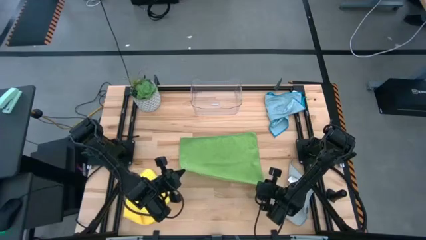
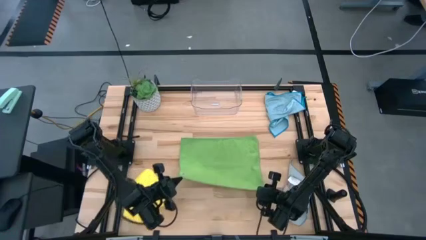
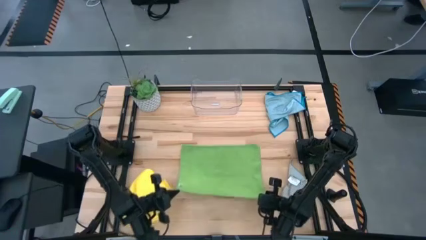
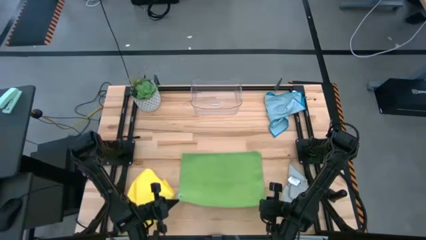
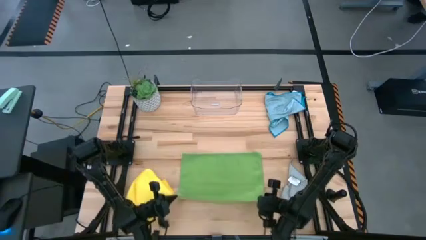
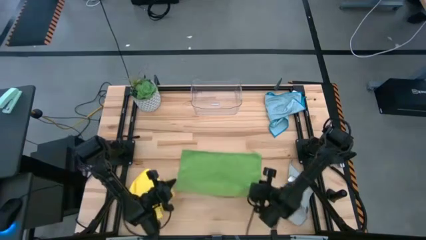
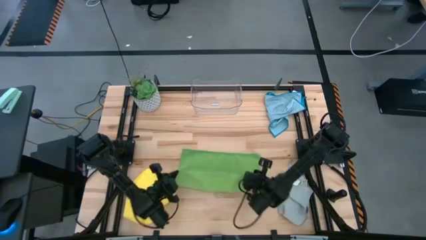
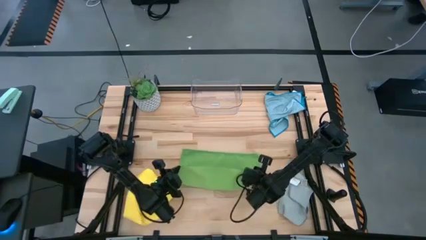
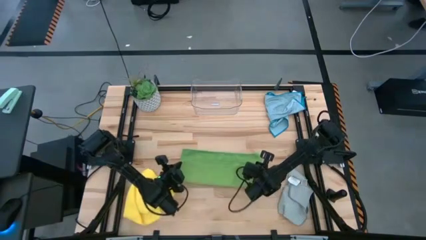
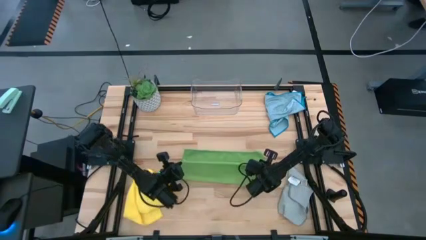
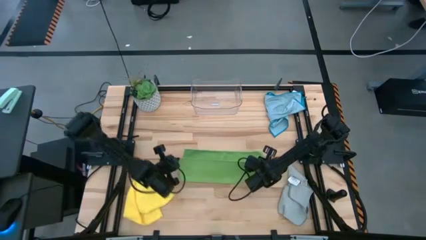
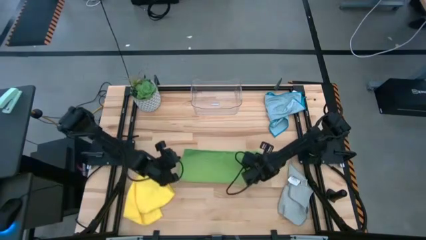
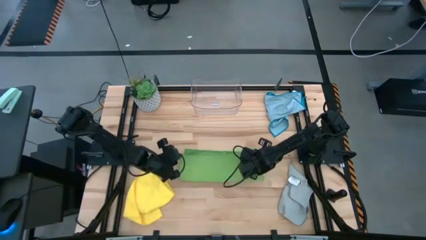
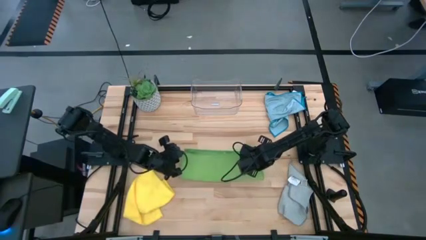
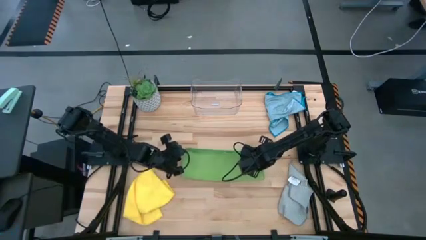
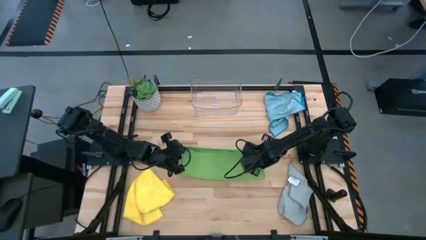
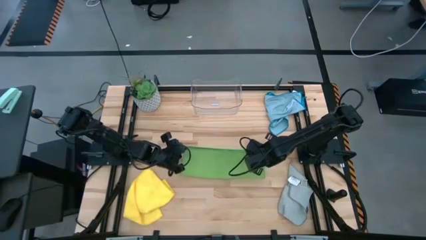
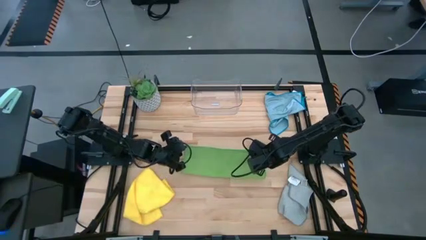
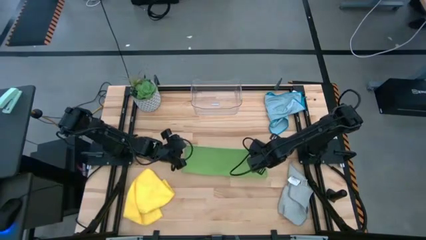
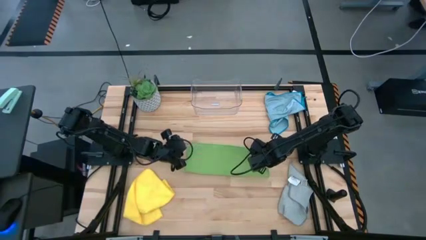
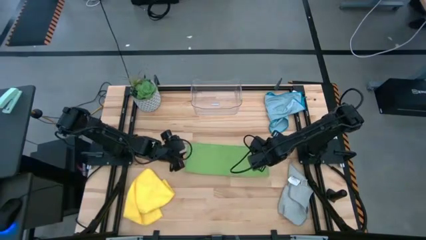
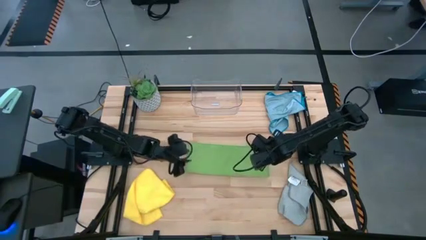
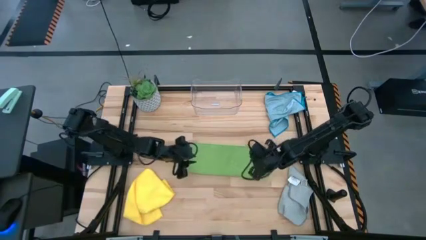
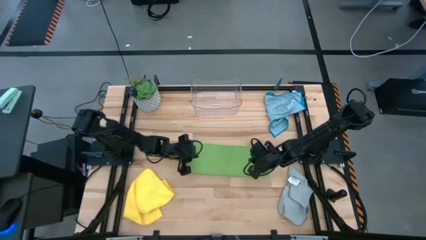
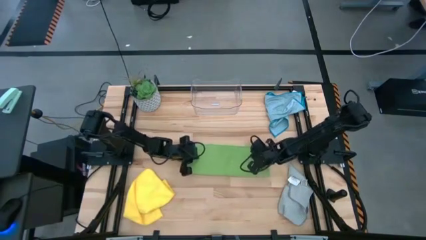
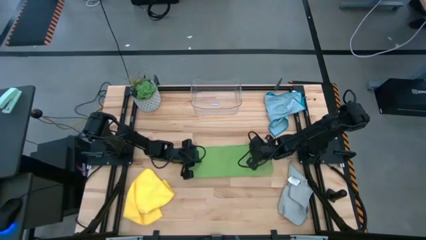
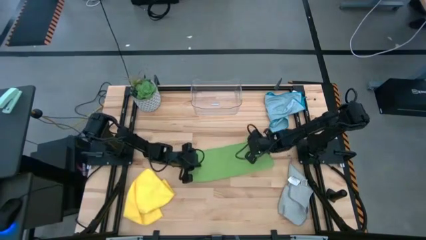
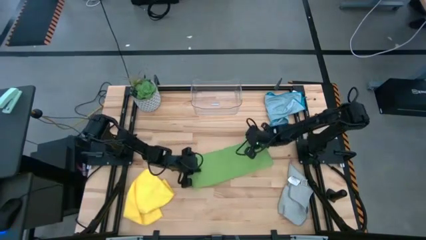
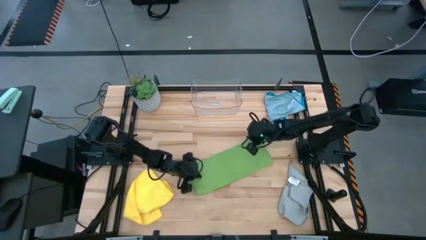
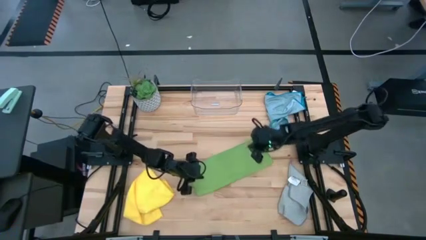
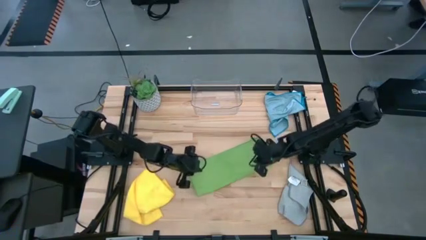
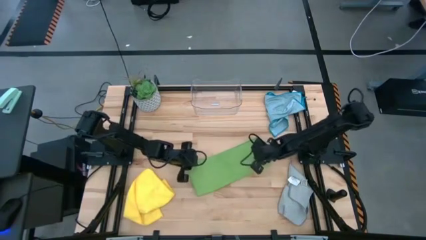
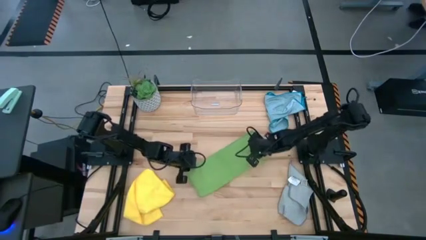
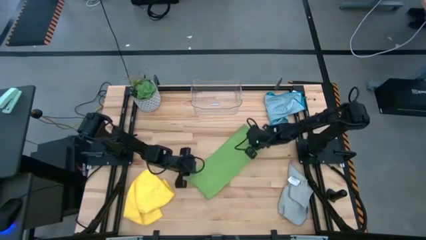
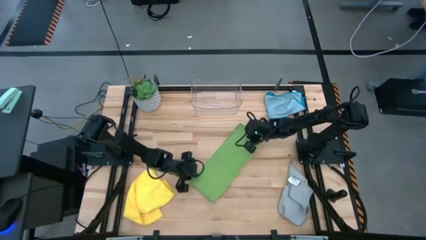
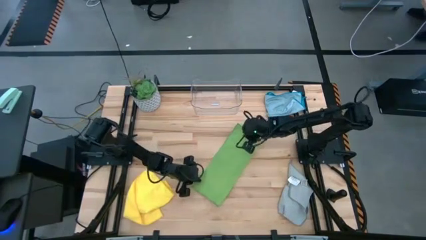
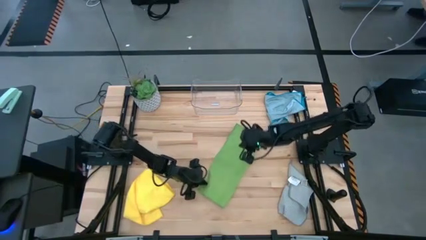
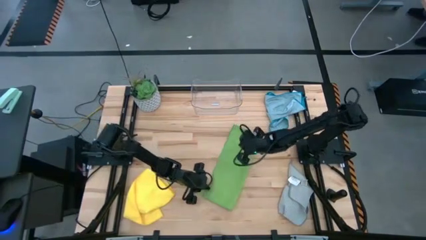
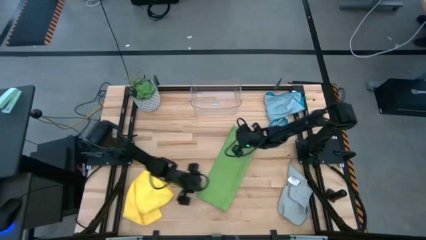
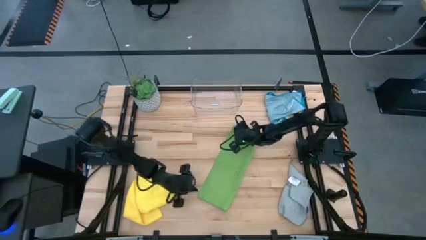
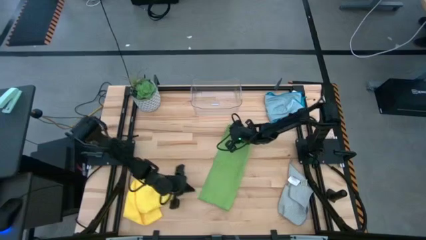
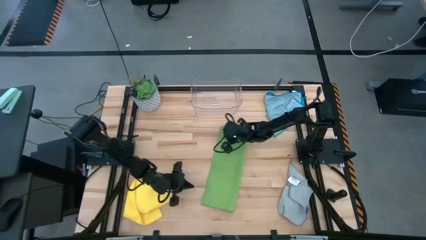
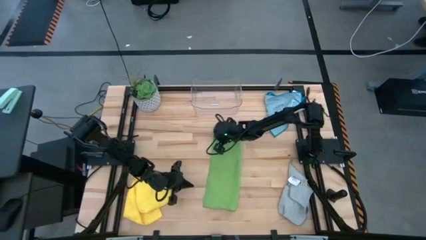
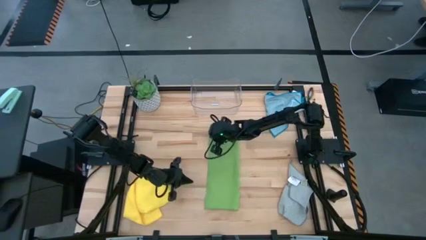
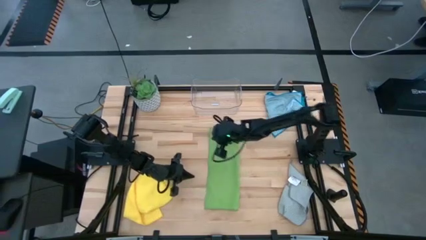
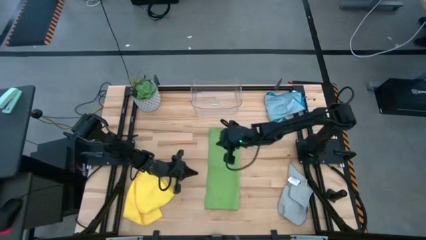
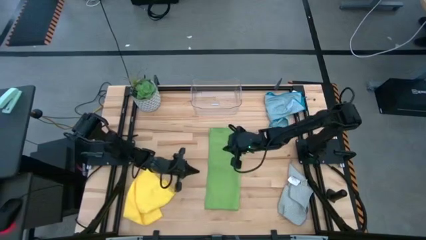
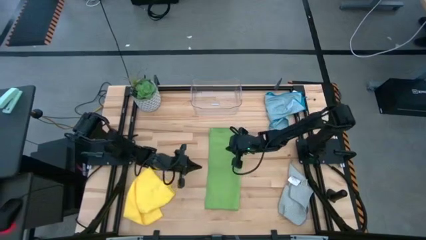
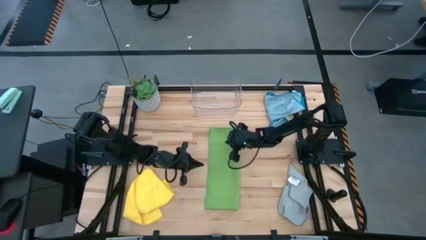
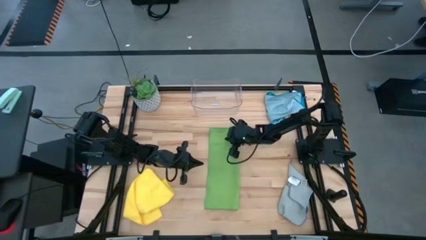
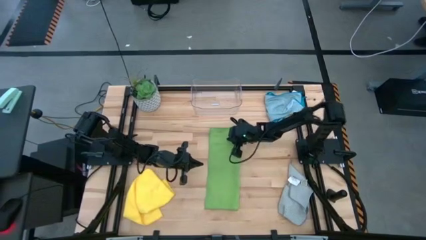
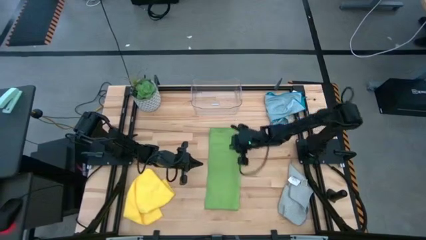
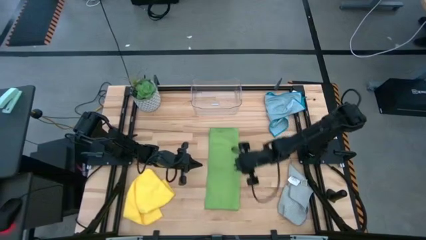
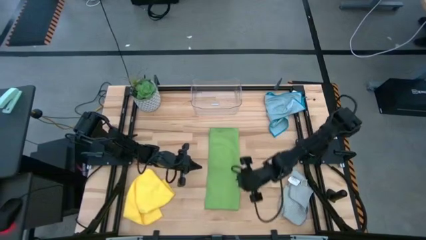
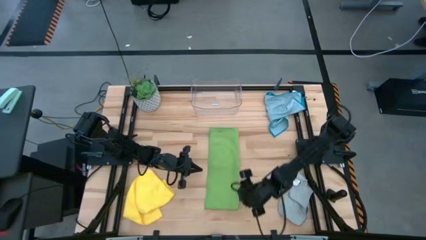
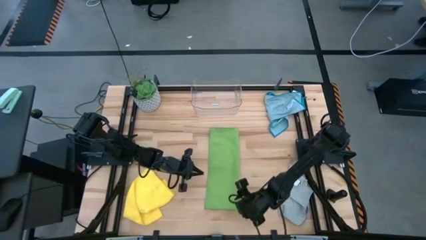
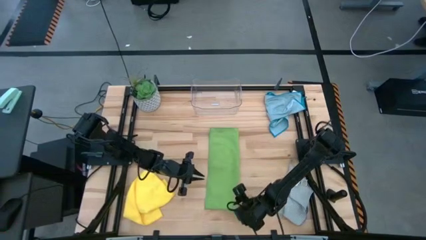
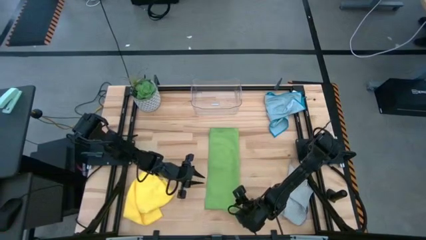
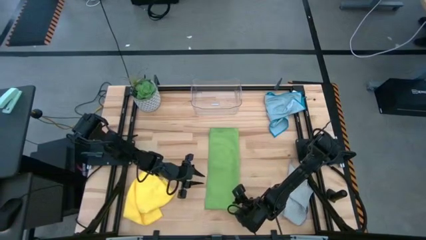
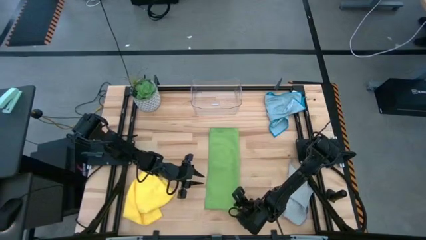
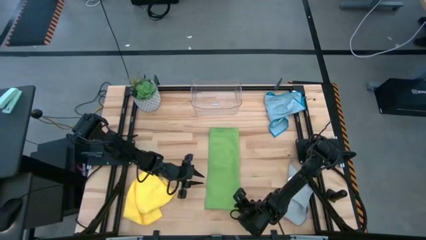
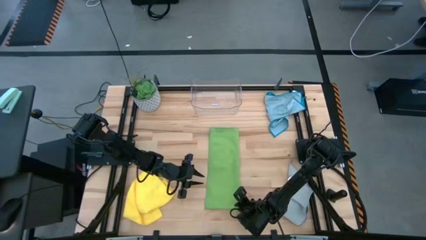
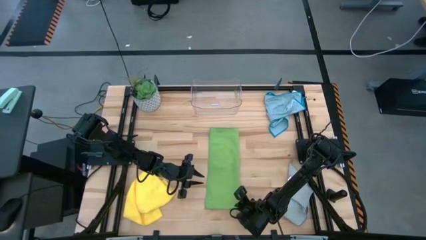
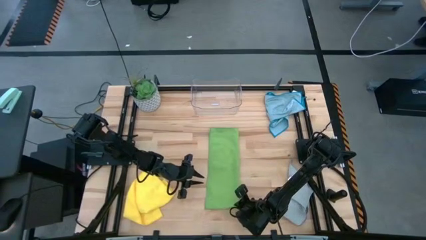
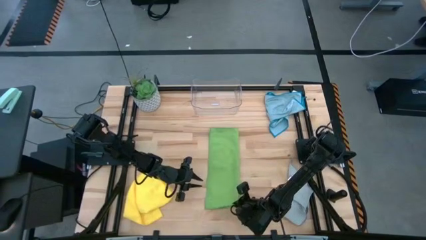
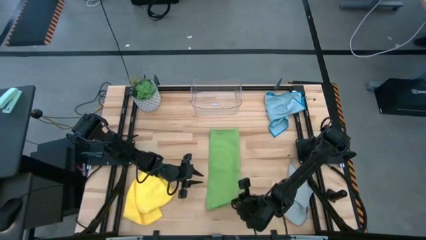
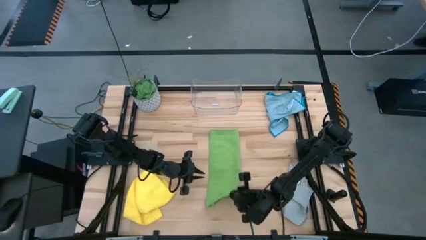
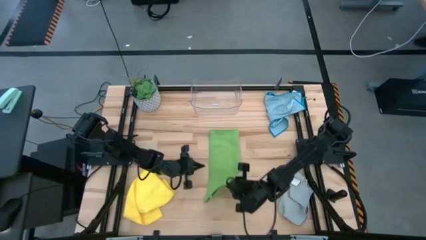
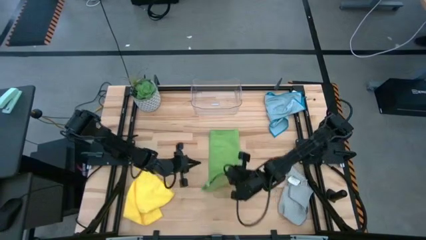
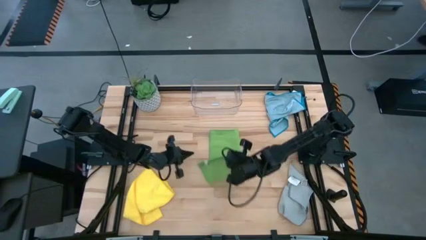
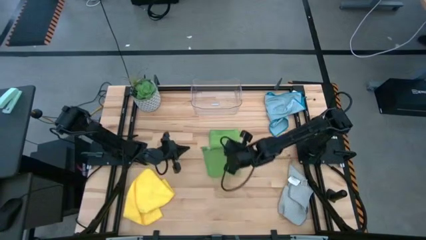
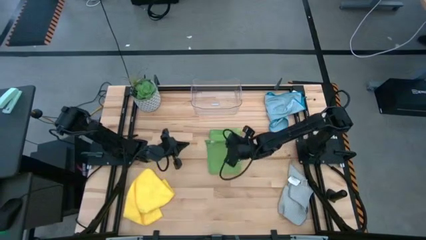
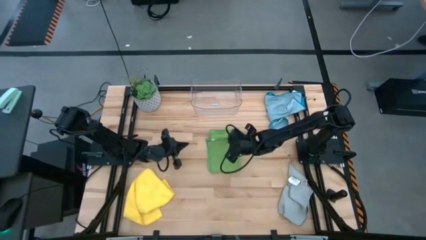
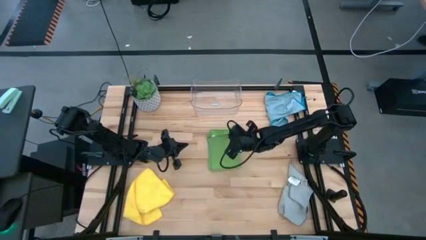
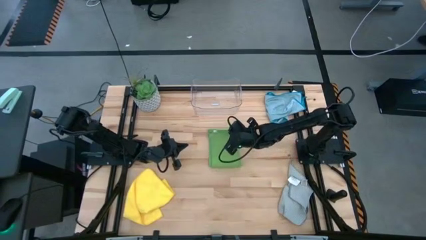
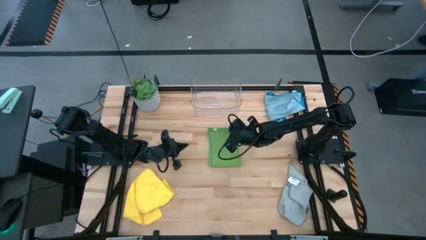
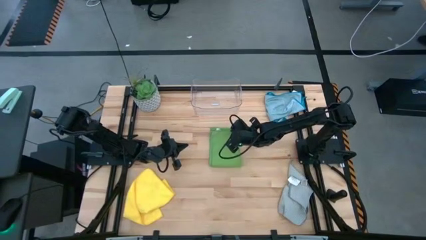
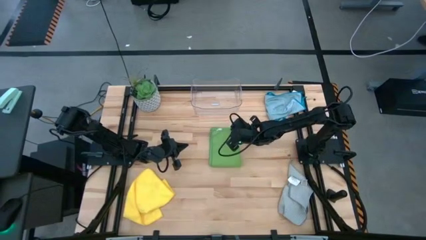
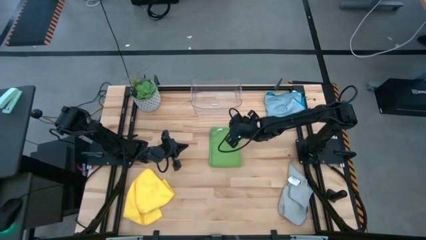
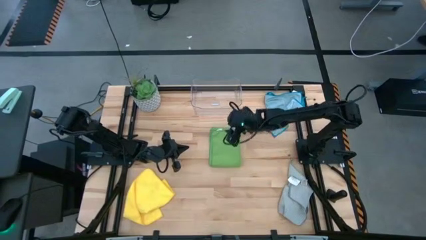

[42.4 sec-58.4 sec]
Task: Fold microfiber towels
Fold the green microfiber cloth
